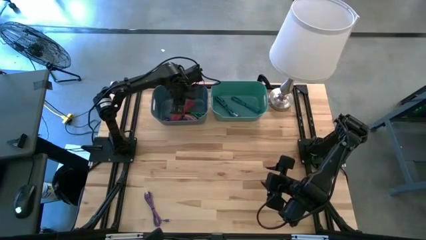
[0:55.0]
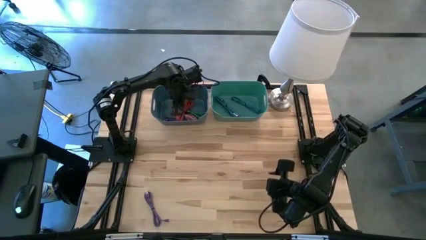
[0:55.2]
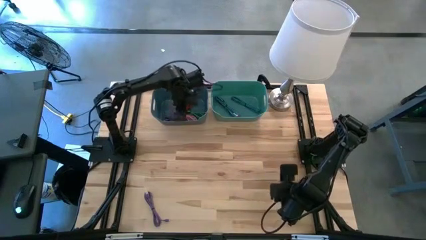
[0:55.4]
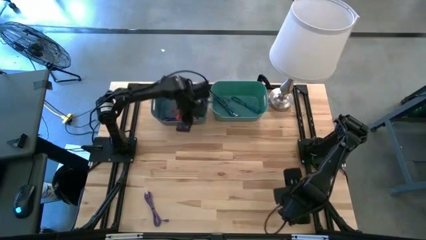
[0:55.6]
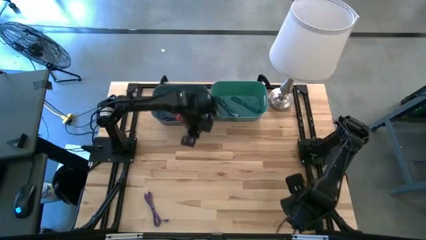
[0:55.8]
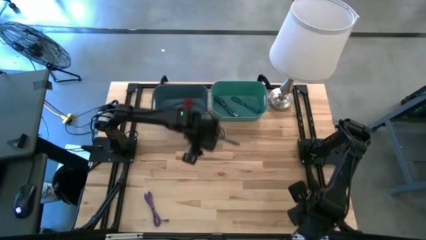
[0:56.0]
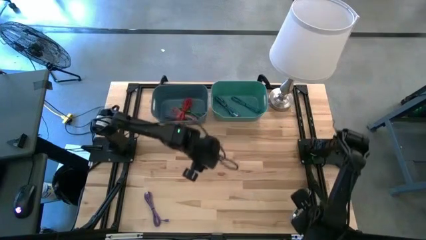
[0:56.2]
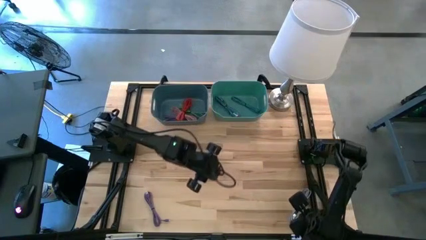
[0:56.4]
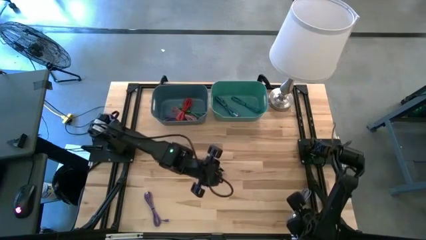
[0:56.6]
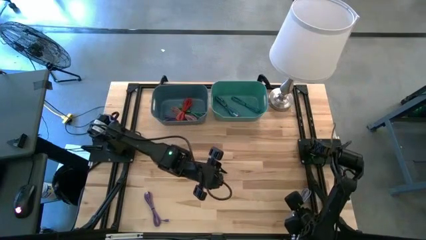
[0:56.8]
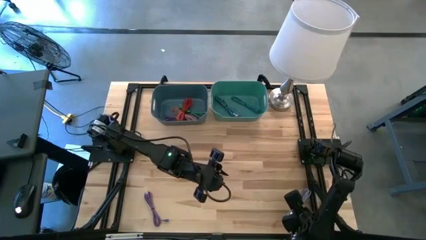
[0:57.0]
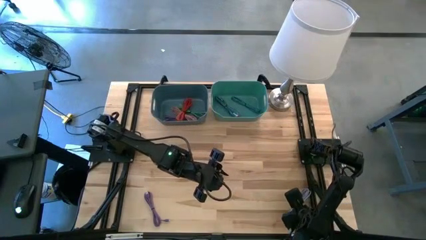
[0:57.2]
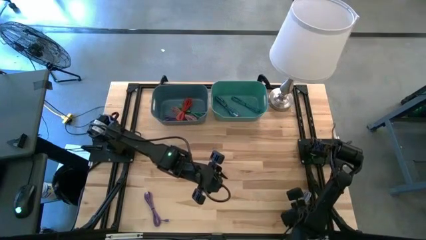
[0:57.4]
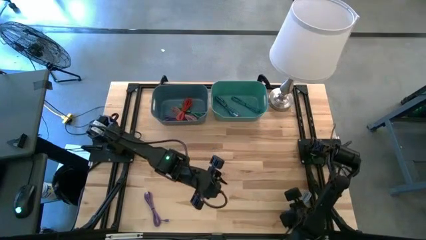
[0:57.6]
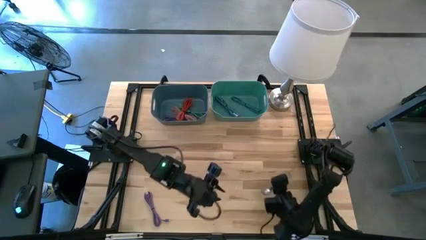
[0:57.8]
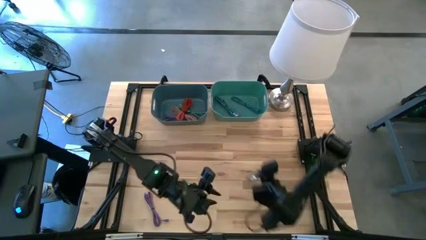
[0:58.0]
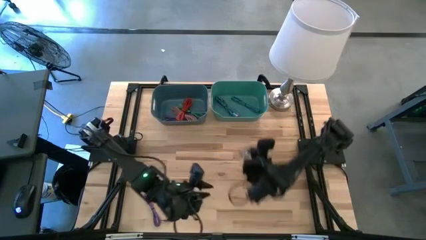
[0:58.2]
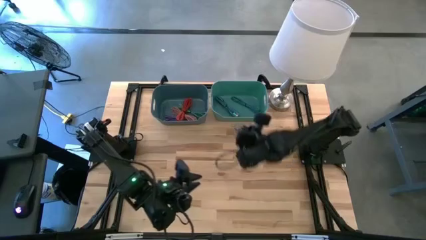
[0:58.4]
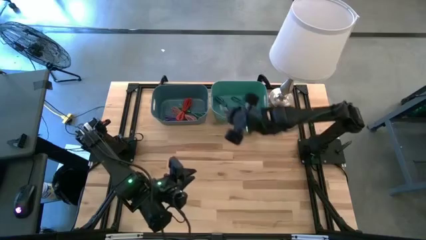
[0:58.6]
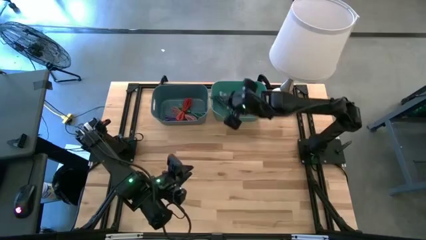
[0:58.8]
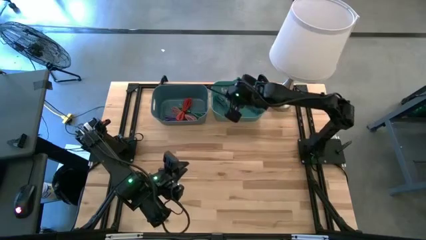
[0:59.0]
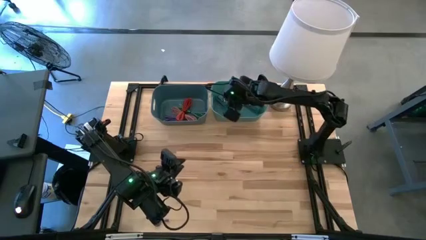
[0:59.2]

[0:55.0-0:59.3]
Task: Pick & Place USB Port
Put the white usb cable into the green bin

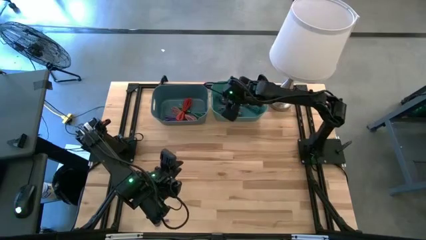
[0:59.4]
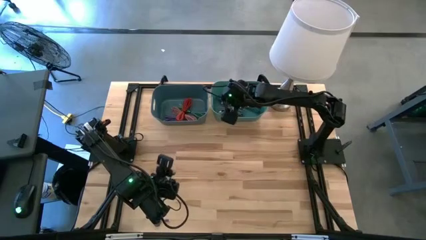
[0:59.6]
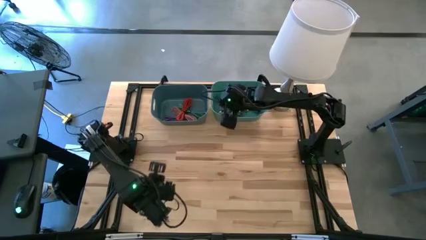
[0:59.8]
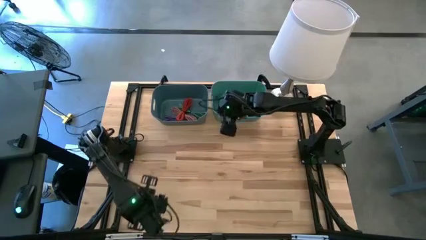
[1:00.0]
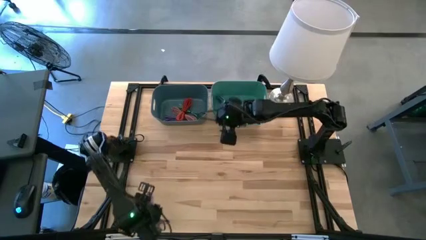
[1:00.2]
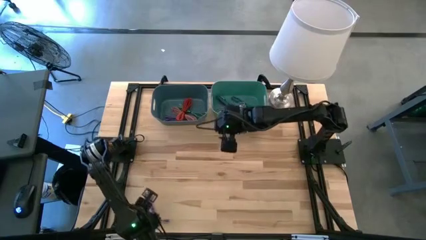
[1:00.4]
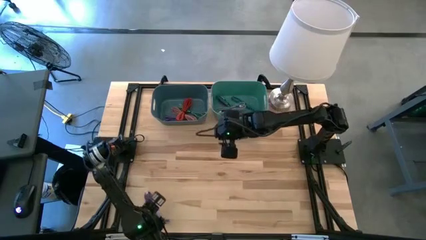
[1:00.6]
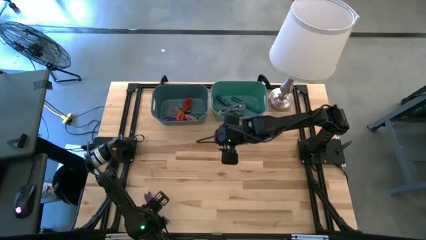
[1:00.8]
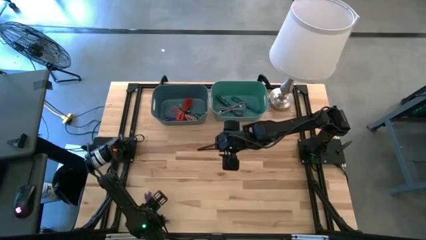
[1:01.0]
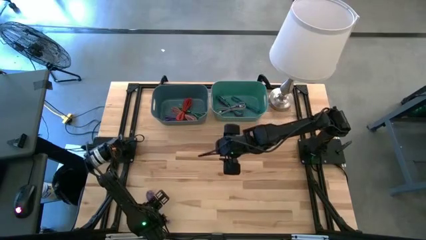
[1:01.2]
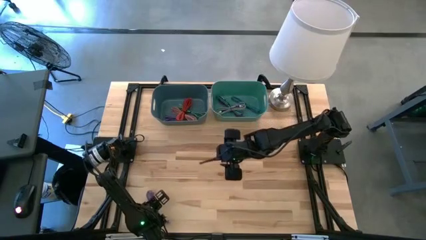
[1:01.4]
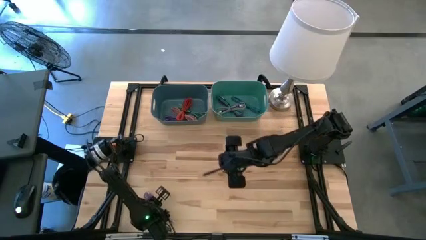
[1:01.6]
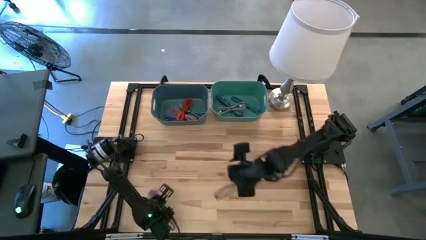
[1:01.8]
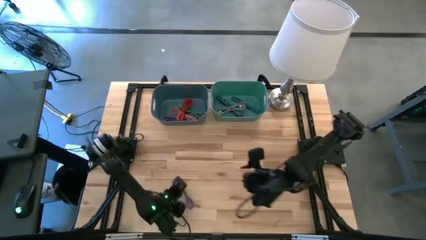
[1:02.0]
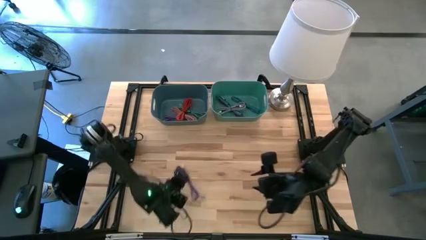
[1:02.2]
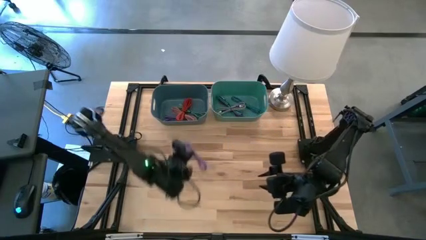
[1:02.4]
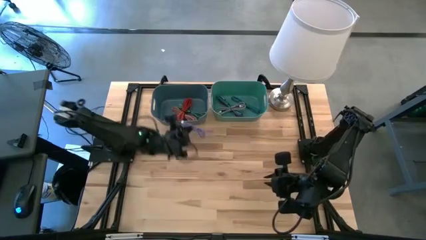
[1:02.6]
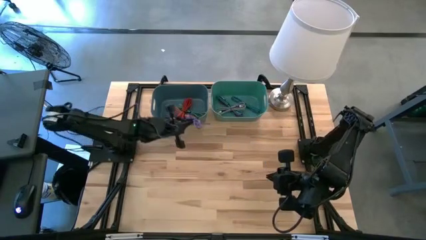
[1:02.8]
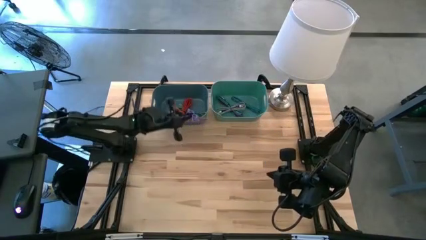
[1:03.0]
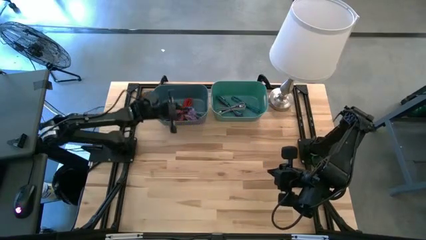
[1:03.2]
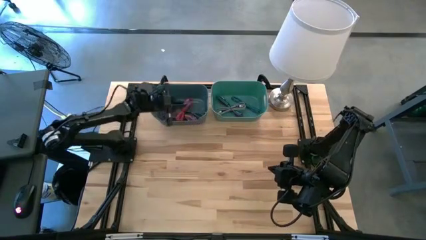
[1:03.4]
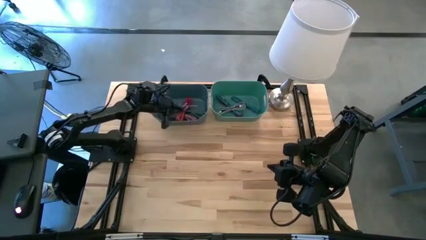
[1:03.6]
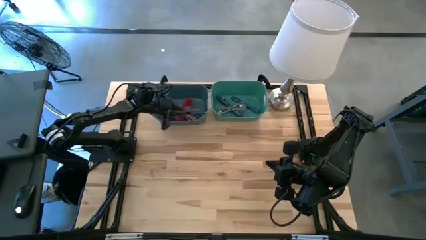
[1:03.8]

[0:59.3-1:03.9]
Put the purple usb cable into the blue bin

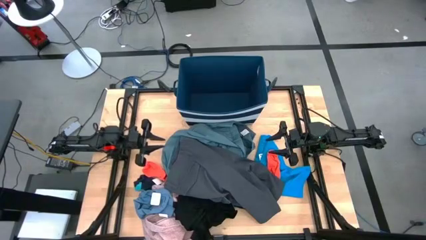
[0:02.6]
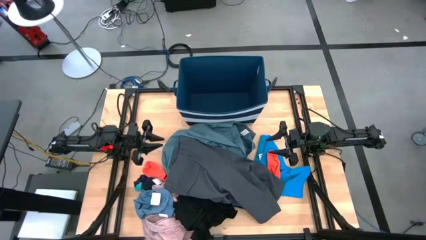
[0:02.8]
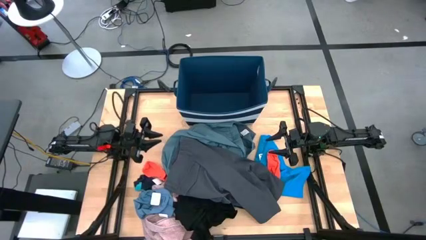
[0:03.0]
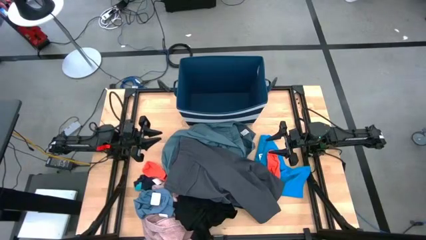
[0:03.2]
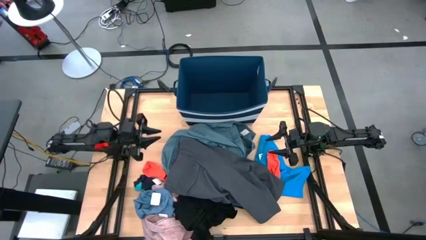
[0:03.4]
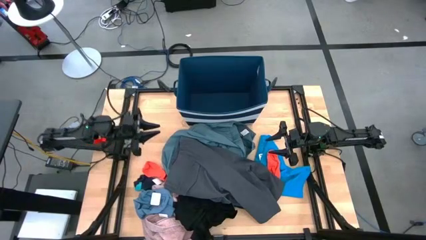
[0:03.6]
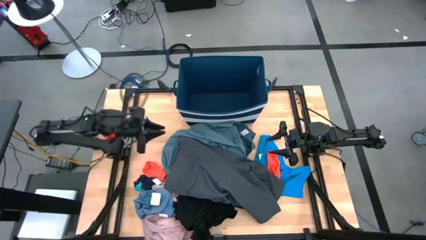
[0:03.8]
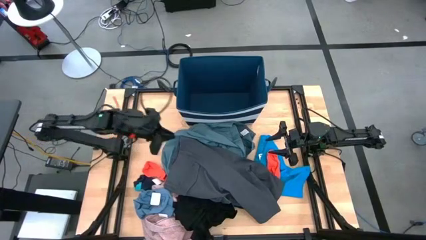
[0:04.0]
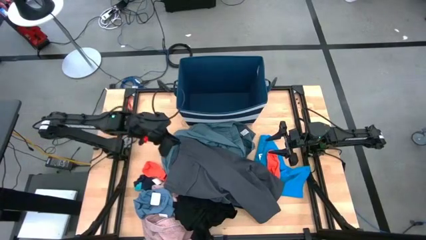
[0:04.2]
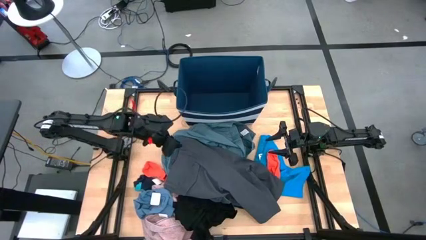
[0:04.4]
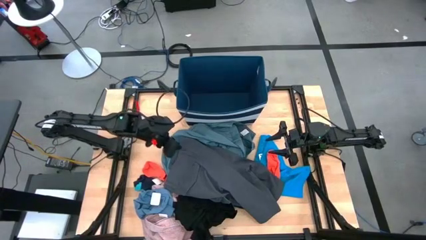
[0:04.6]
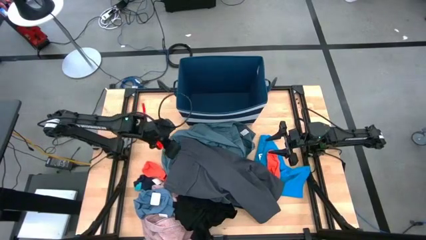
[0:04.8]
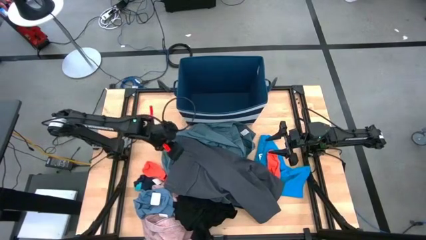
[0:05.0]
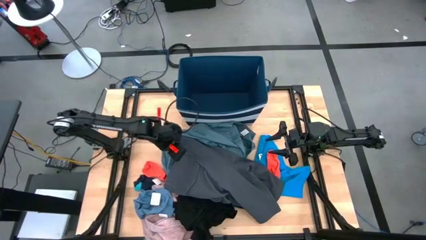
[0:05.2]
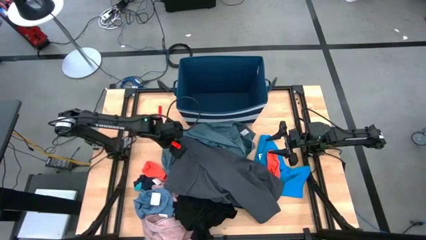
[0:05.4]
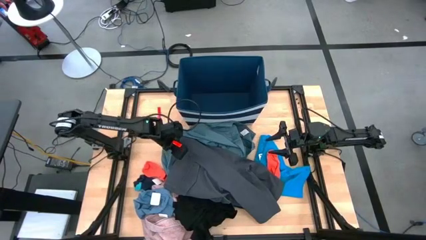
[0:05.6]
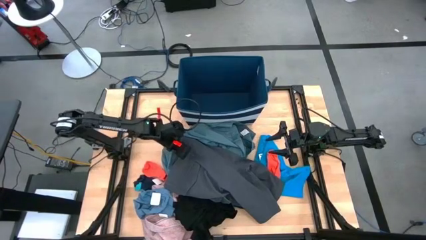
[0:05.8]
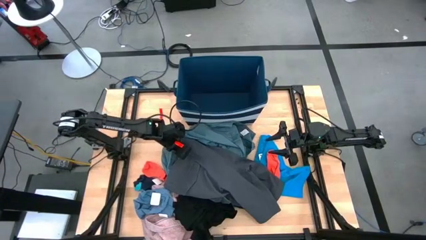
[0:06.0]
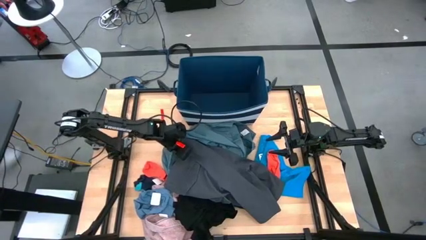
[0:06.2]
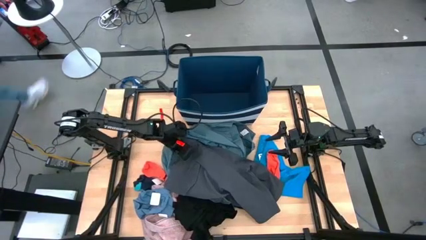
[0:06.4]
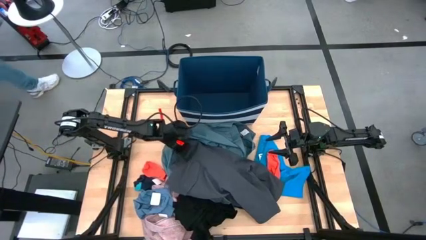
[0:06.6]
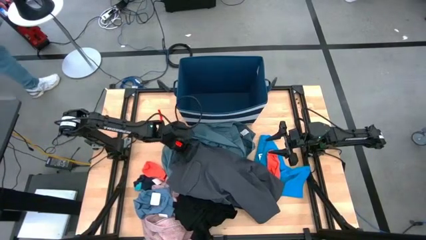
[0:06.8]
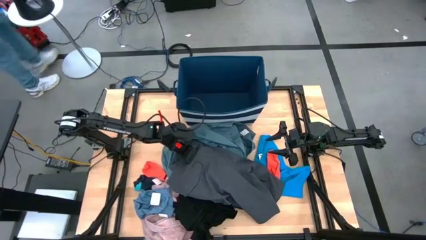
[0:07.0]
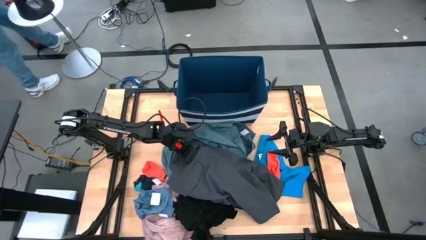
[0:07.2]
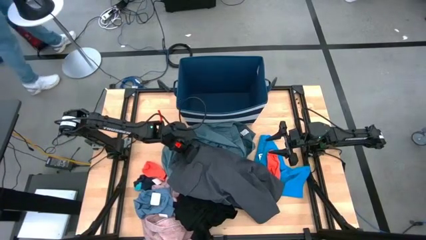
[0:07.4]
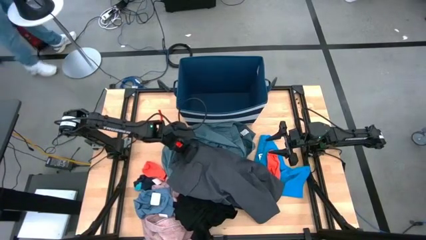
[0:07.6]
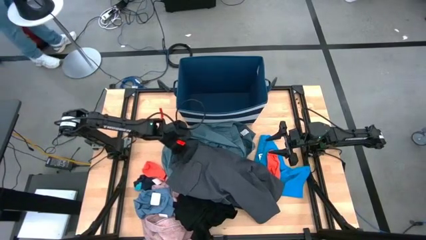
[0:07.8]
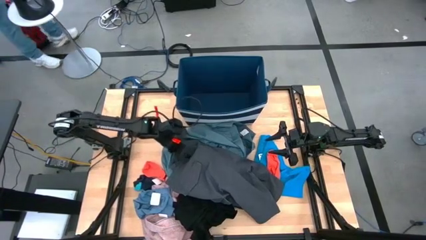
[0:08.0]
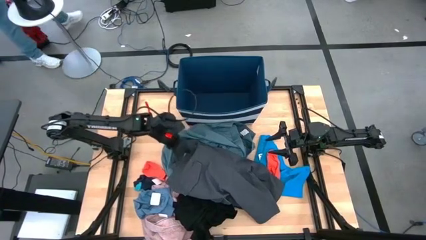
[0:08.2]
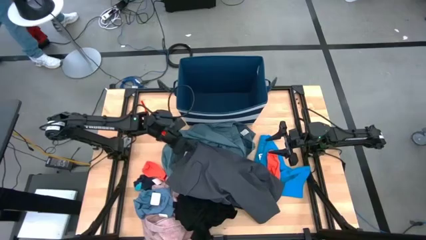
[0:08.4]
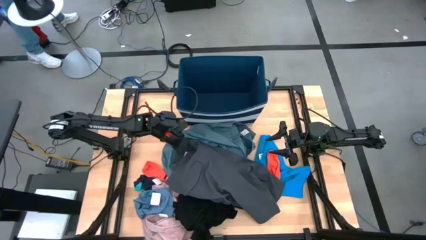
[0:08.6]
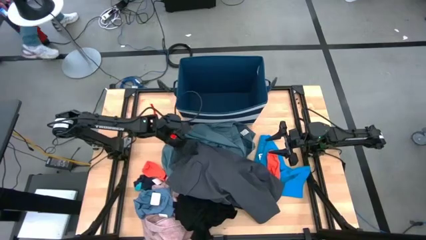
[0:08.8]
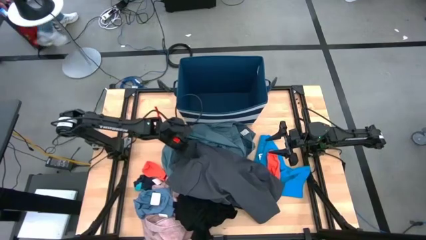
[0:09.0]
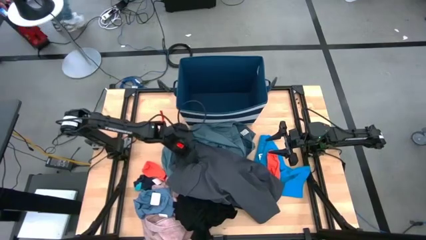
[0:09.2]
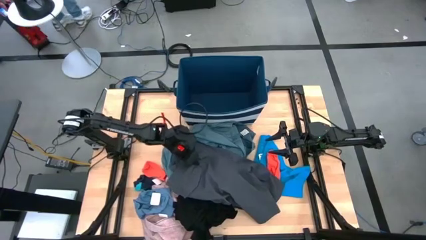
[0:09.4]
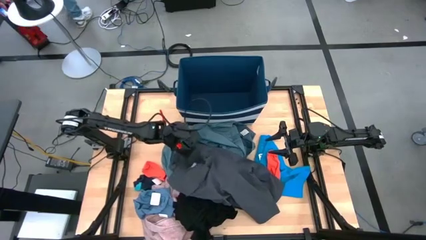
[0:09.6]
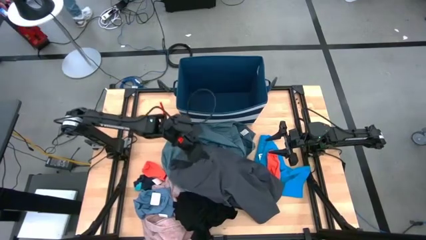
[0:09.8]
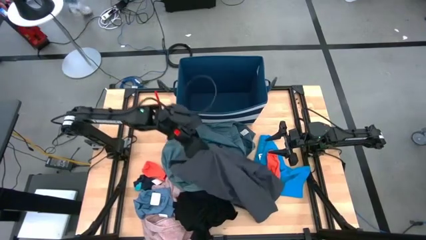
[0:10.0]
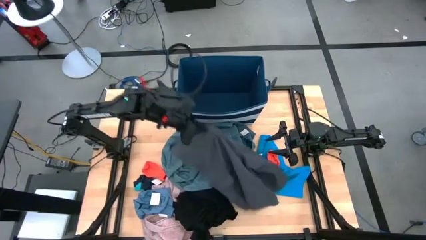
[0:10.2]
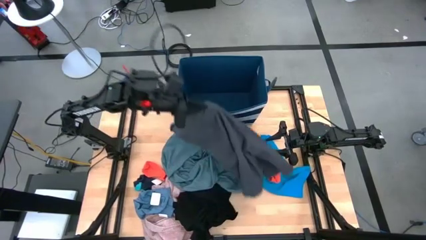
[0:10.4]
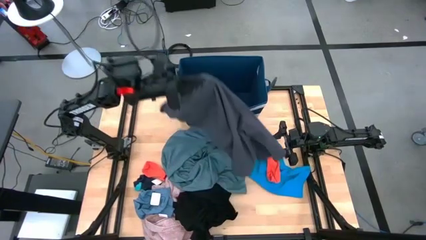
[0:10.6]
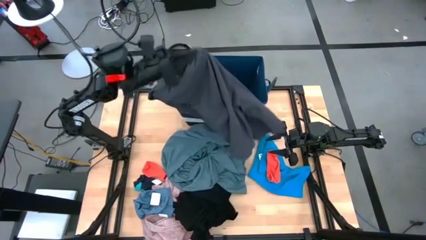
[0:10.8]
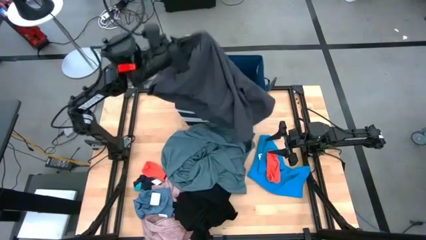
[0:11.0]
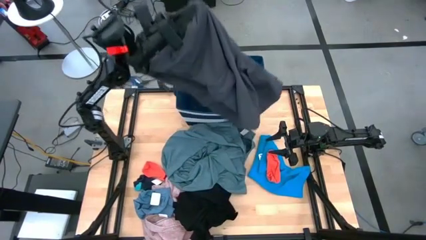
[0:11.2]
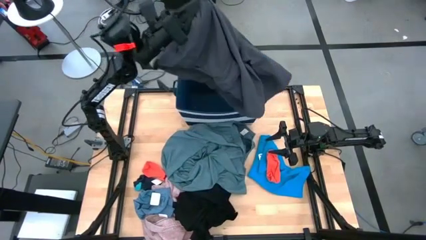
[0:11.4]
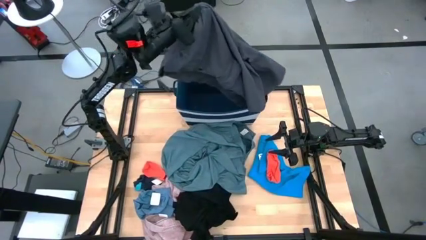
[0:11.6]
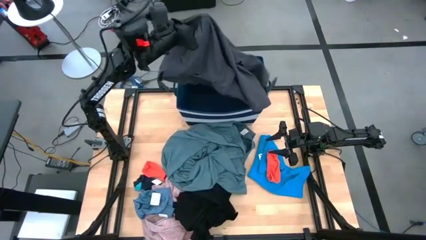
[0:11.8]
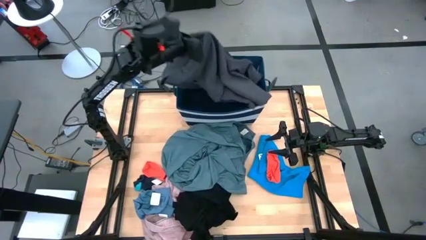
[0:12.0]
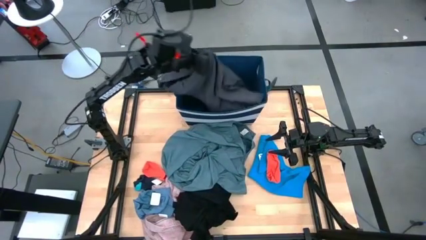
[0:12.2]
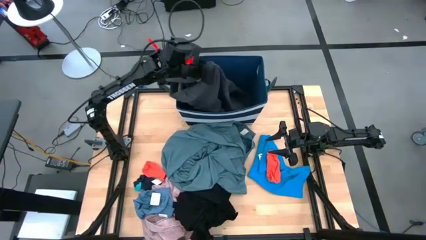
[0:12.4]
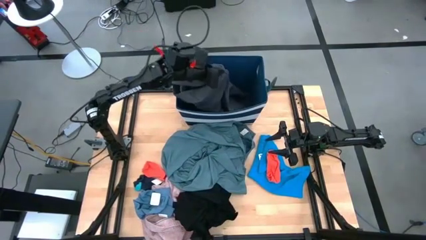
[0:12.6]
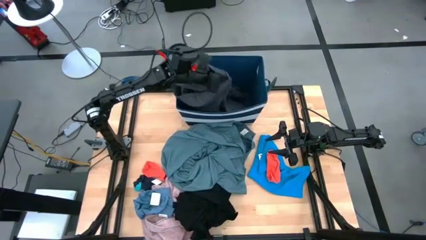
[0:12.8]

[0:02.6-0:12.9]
Task: Sort clothes
Put the grey shorts into the blue bin
